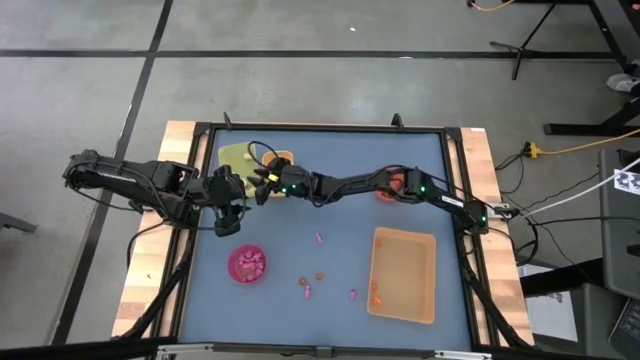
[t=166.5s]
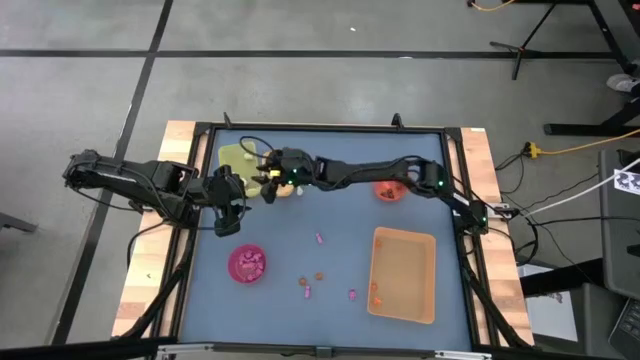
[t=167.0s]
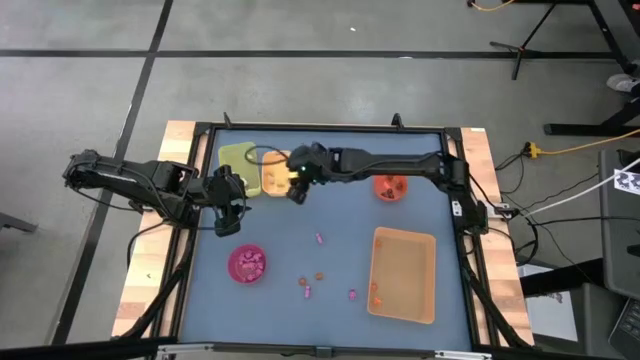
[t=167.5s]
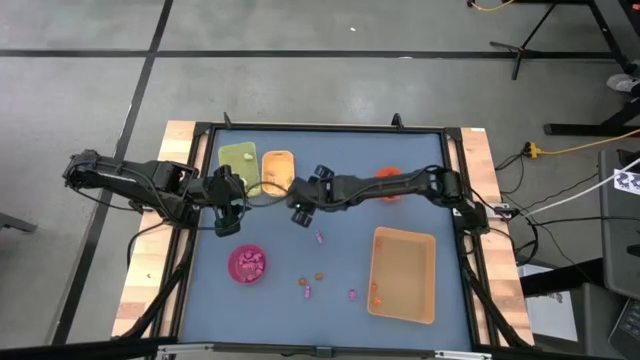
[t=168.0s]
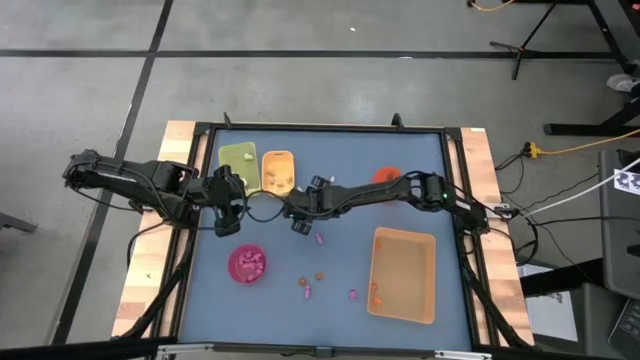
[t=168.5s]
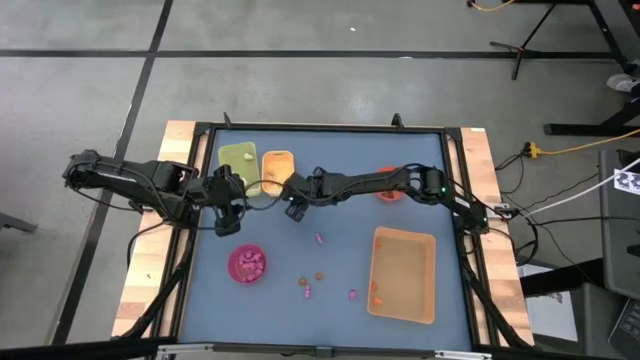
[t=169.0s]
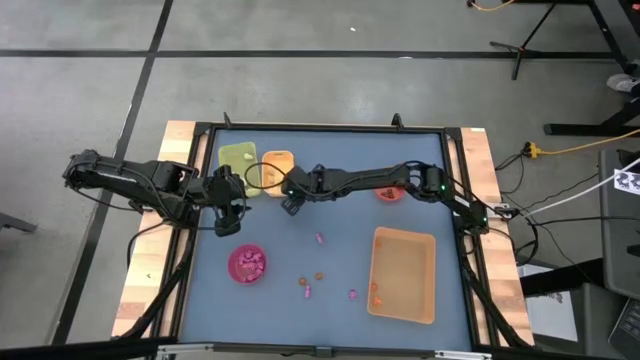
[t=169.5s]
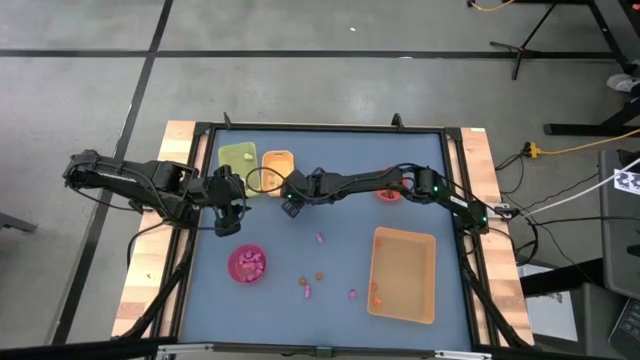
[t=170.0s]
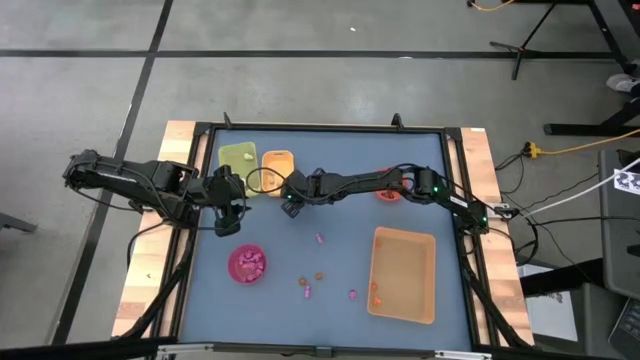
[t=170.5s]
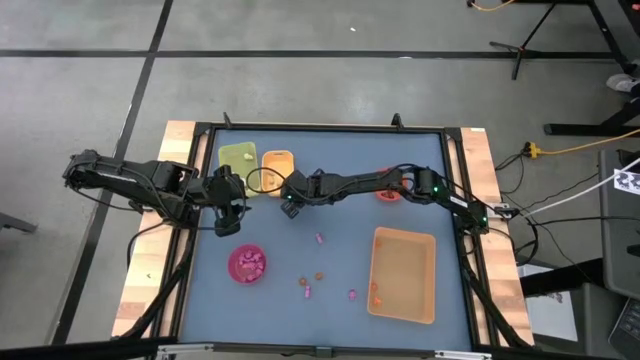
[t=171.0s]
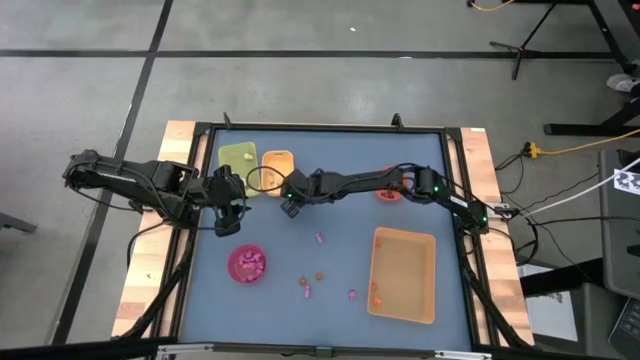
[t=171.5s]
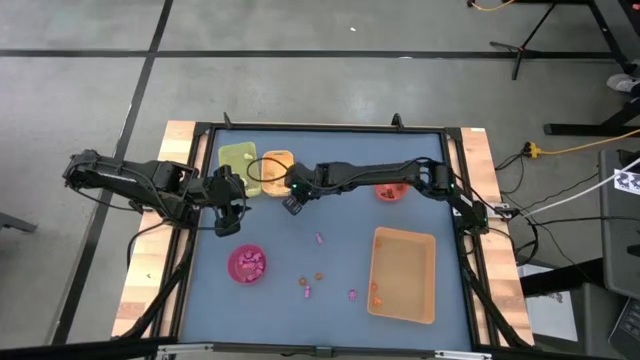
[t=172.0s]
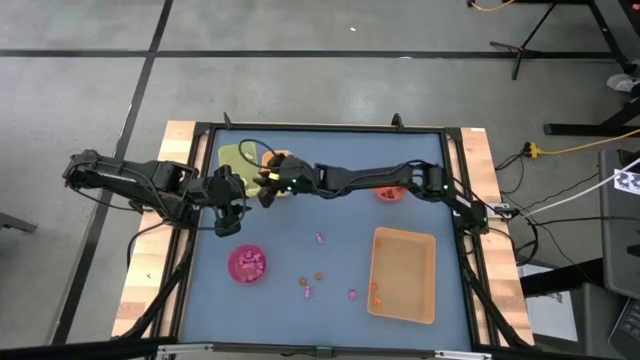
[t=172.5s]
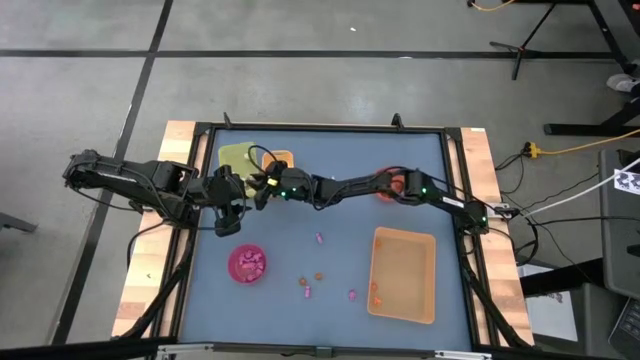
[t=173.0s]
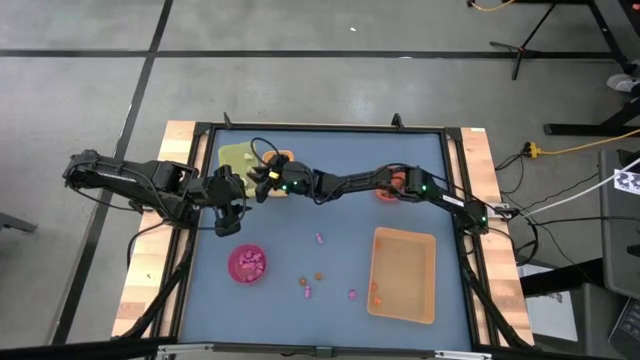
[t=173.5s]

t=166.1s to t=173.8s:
Task: Sort Halloween decoration
Put the white skull toy into the yellow bin

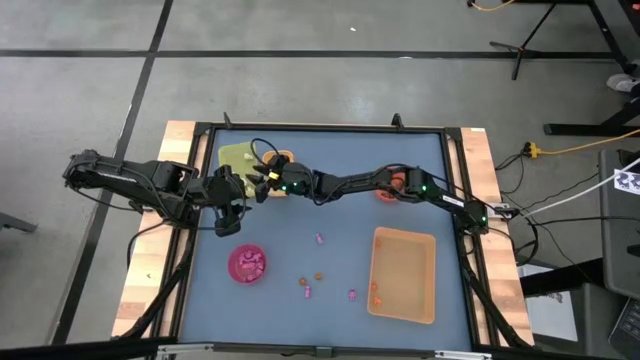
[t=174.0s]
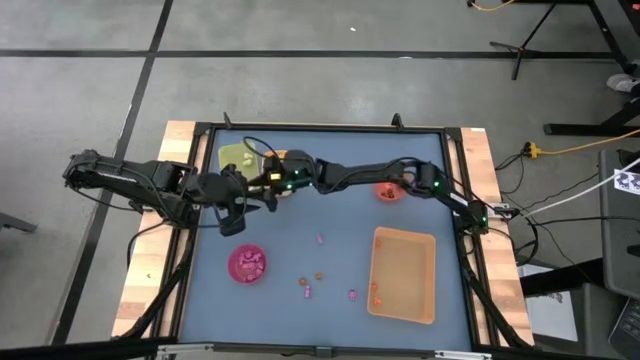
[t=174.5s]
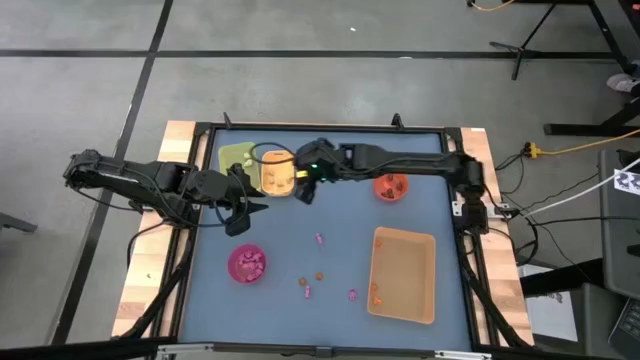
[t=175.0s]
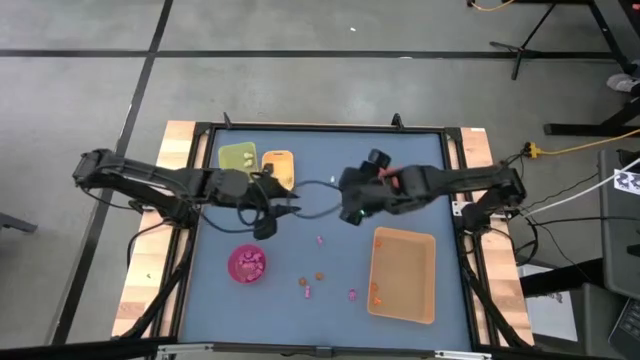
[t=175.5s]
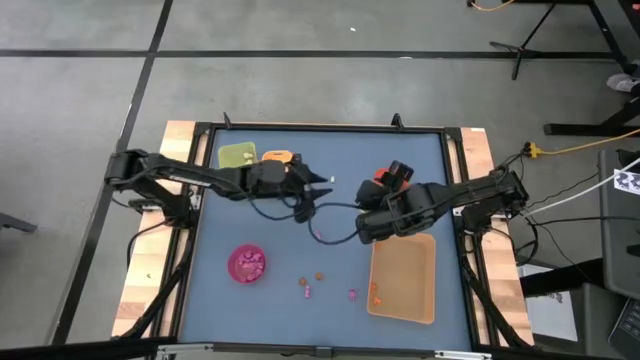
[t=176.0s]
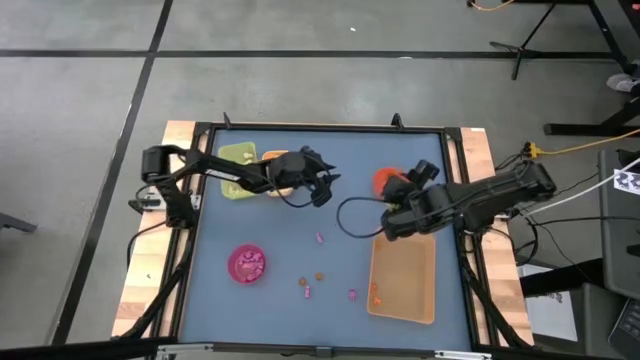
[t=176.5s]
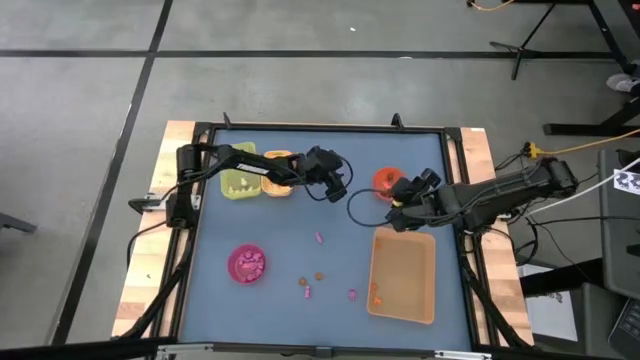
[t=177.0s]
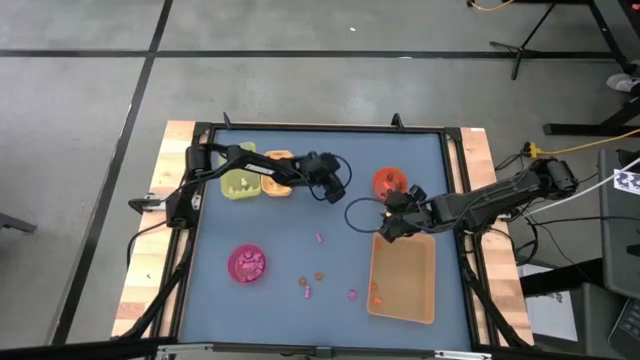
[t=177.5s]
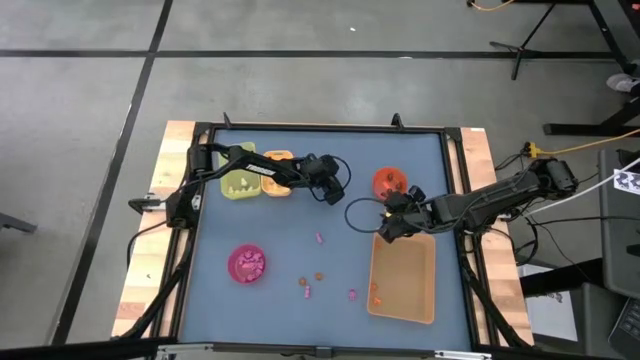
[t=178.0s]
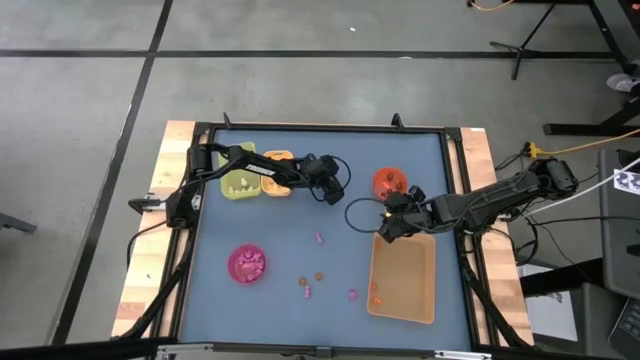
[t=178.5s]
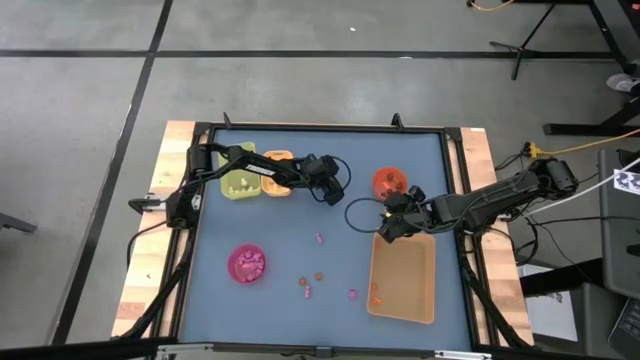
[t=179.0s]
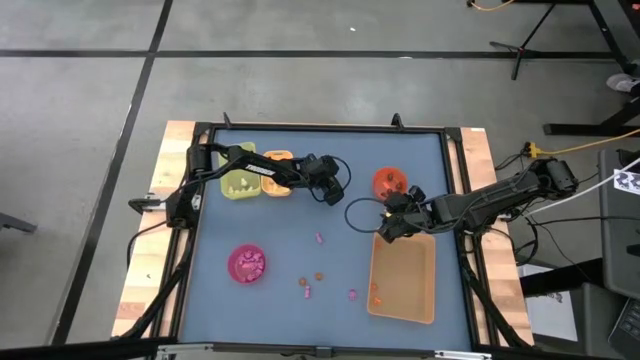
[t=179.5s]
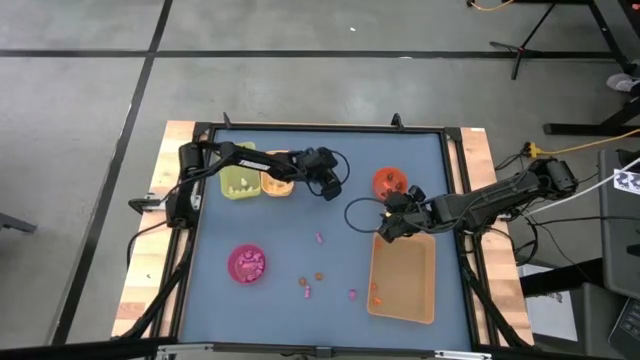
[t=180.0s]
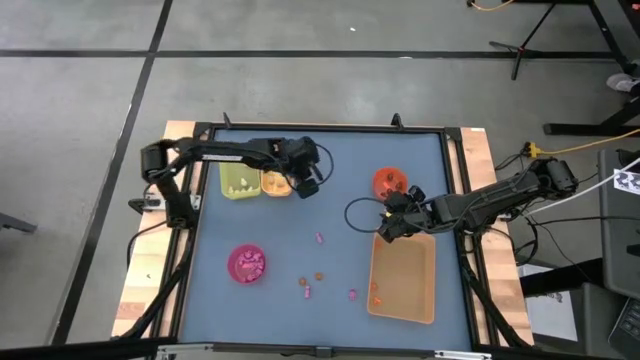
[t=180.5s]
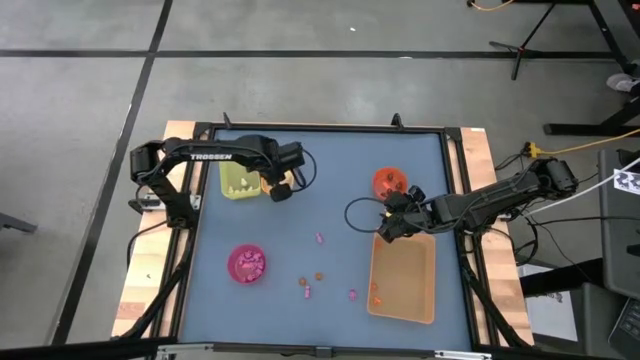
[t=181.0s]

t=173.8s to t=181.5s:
Put the small white skull toy into the yellow bin

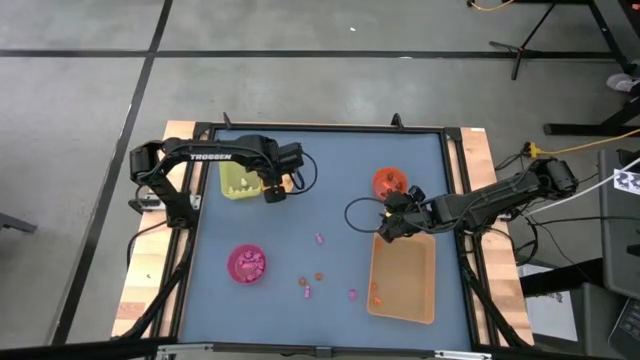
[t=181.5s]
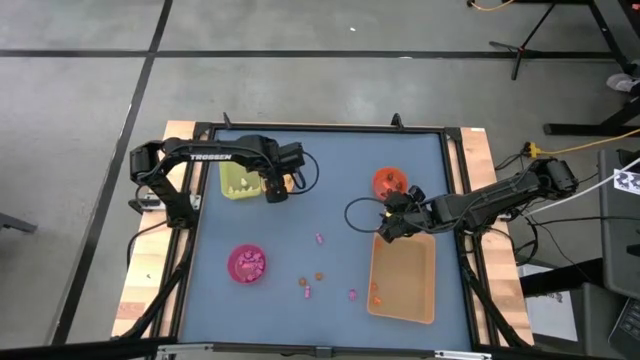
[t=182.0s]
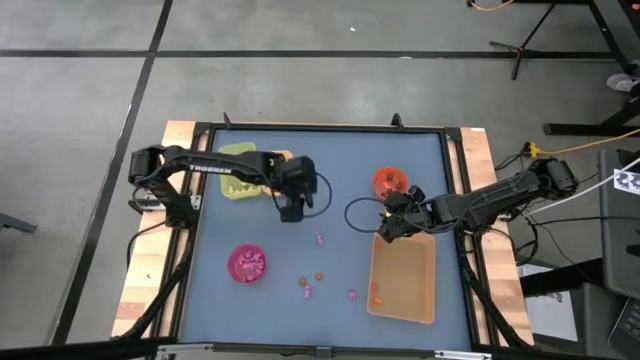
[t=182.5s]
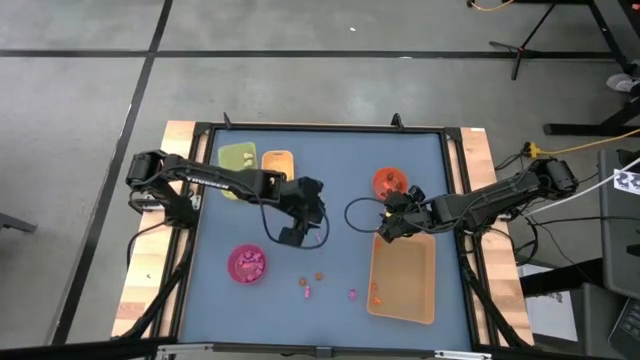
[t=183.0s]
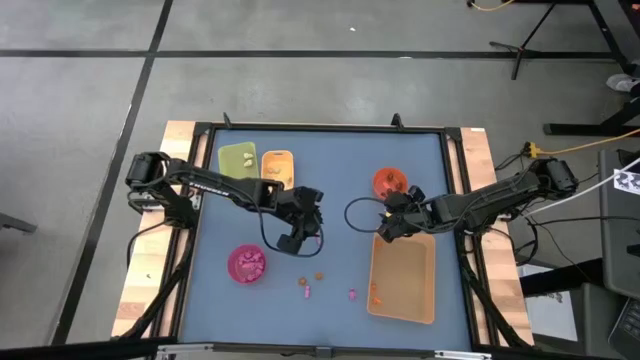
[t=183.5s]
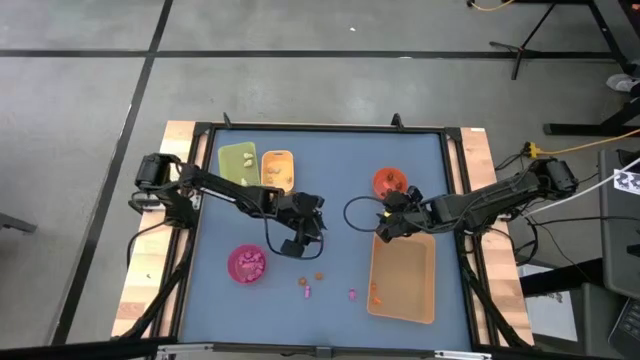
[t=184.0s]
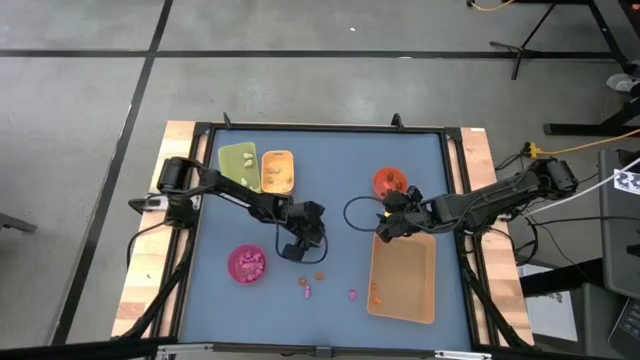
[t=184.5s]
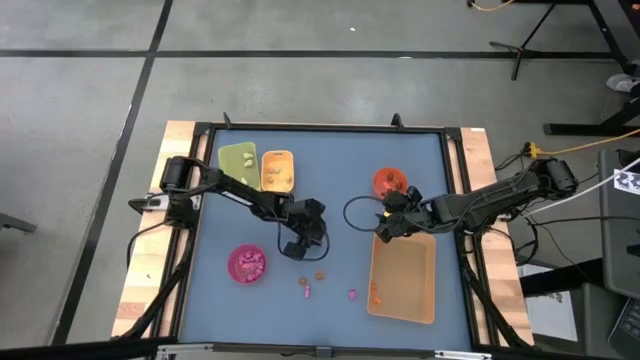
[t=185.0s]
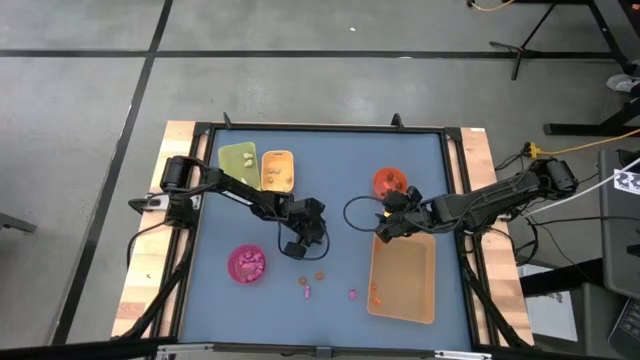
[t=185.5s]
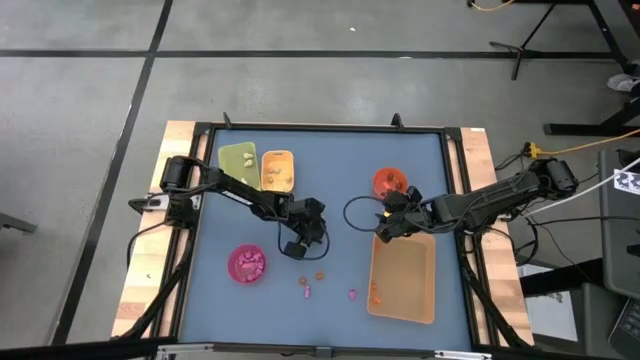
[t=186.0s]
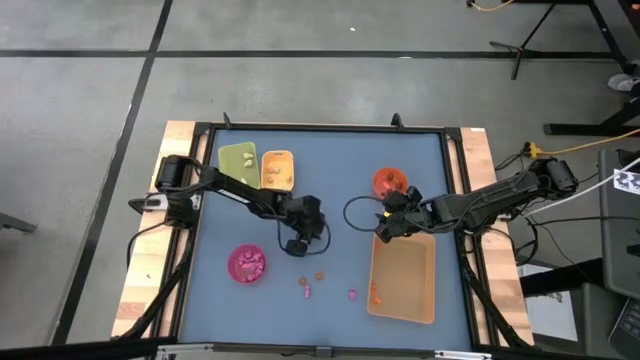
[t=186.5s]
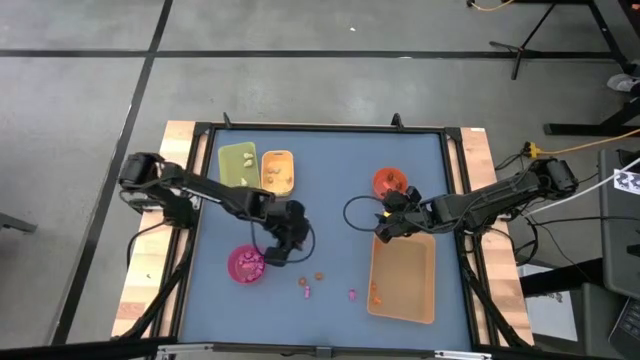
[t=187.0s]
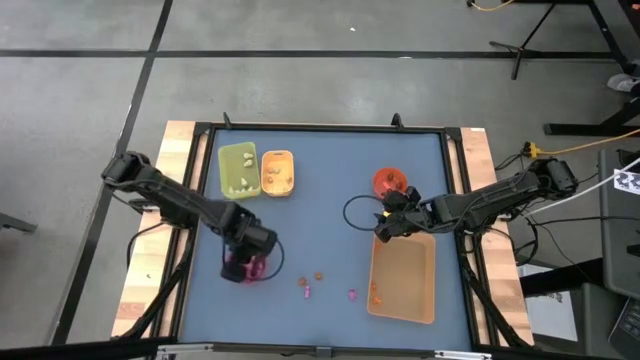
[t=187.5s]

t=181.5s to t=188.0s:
Put the pink skeleton toy into the red bowl
